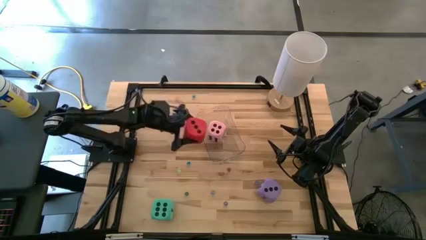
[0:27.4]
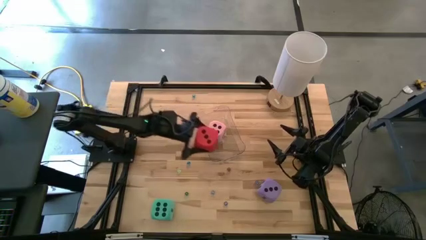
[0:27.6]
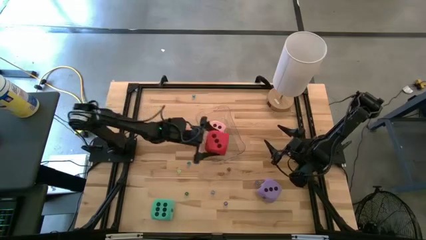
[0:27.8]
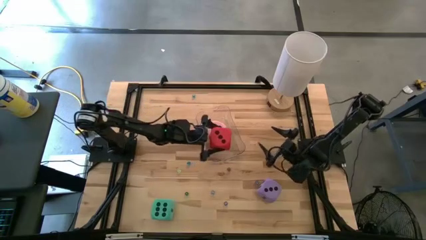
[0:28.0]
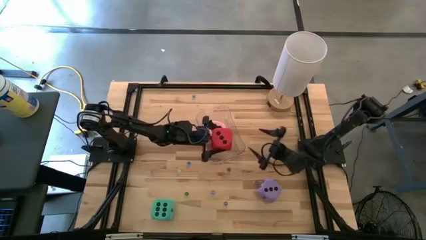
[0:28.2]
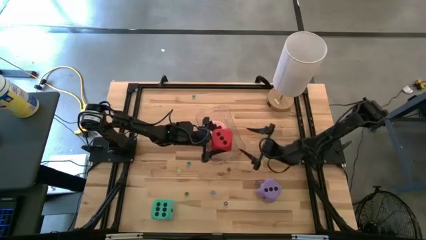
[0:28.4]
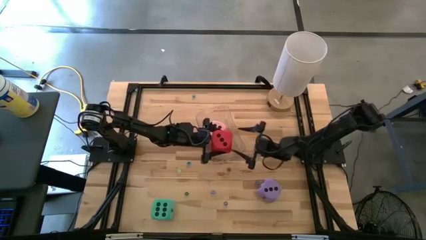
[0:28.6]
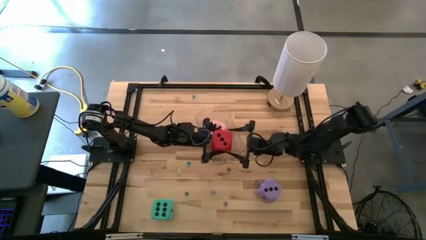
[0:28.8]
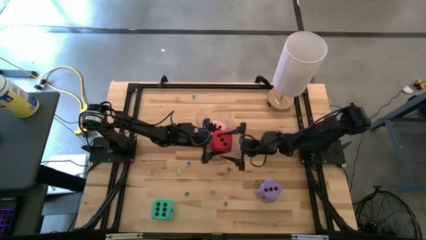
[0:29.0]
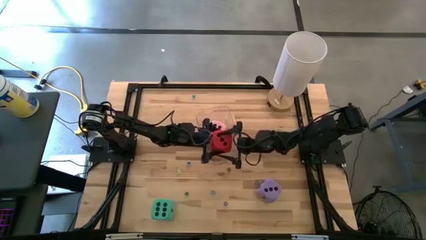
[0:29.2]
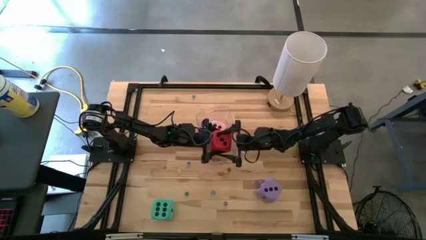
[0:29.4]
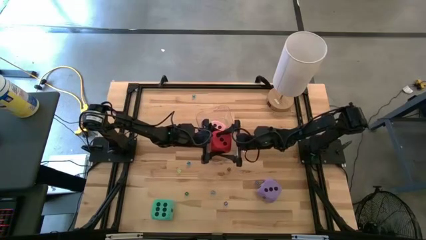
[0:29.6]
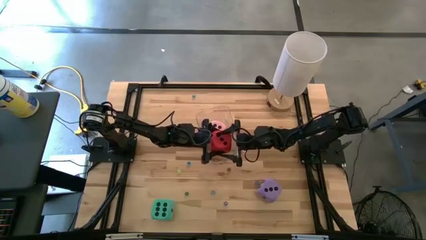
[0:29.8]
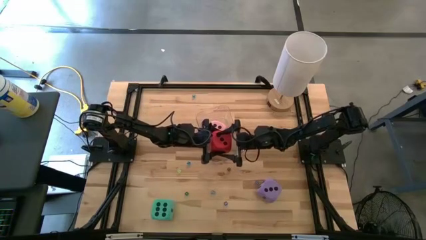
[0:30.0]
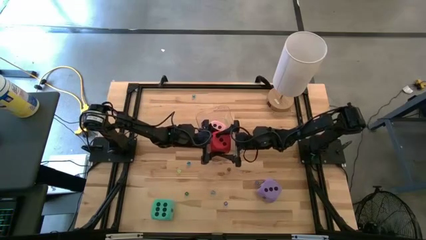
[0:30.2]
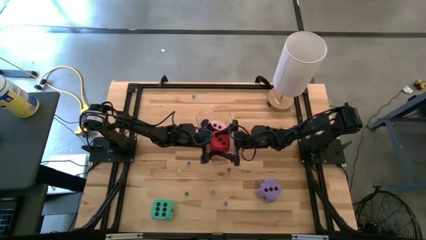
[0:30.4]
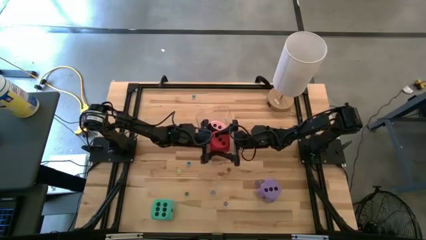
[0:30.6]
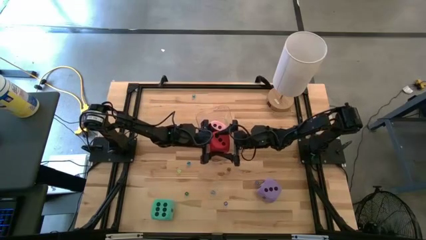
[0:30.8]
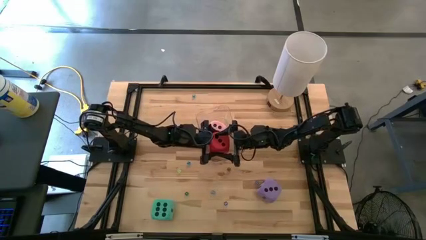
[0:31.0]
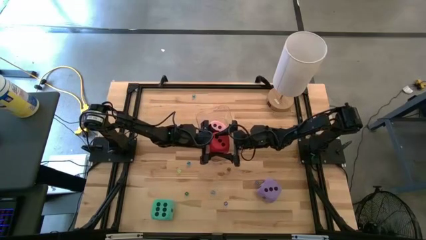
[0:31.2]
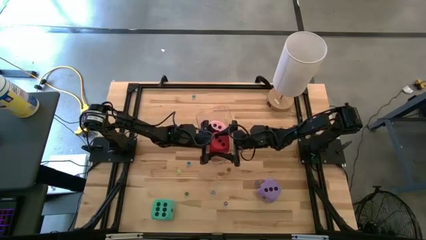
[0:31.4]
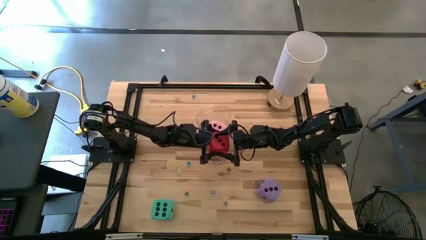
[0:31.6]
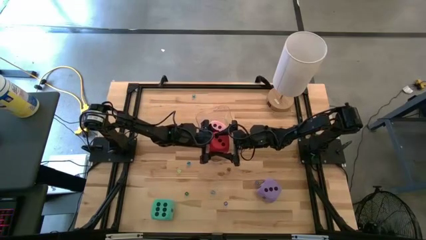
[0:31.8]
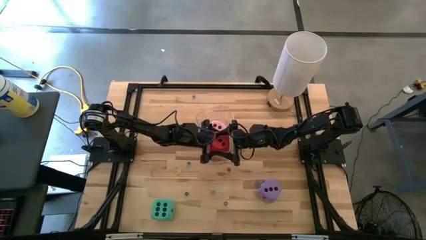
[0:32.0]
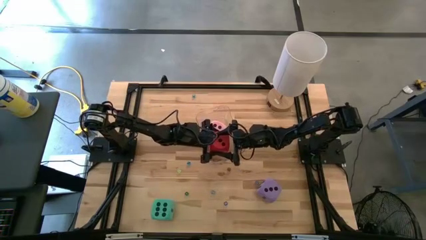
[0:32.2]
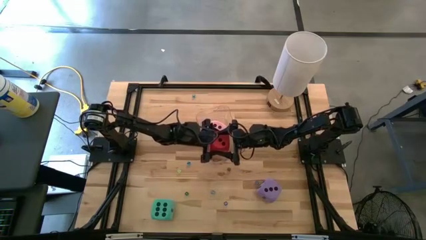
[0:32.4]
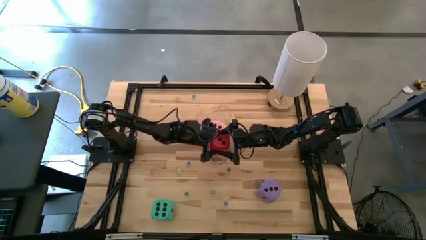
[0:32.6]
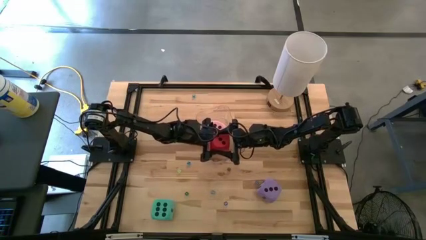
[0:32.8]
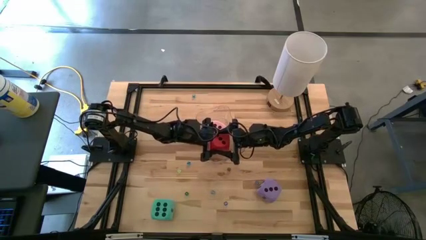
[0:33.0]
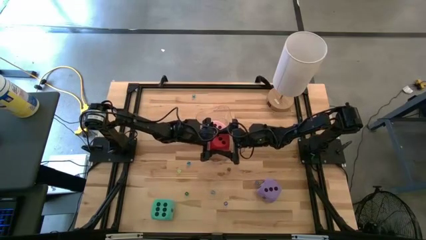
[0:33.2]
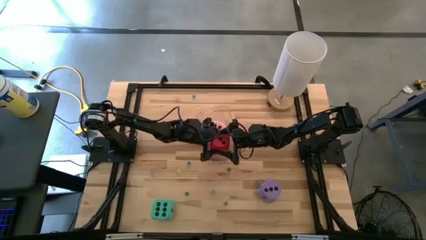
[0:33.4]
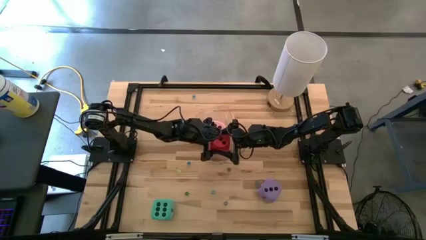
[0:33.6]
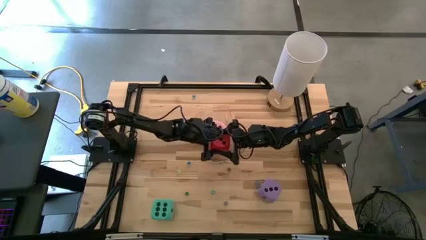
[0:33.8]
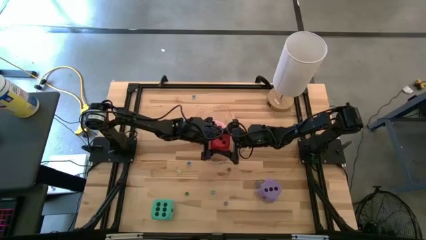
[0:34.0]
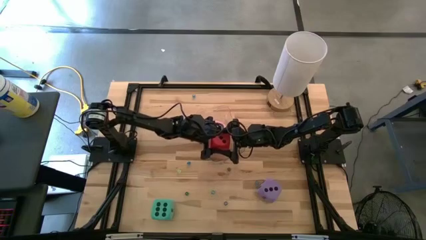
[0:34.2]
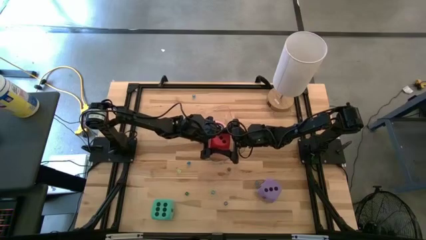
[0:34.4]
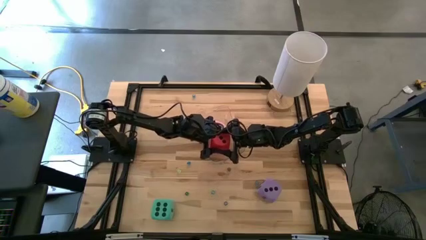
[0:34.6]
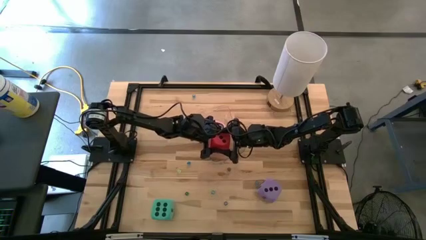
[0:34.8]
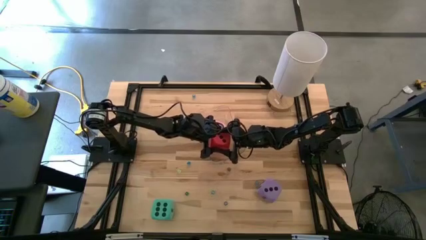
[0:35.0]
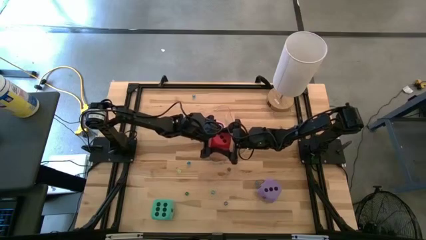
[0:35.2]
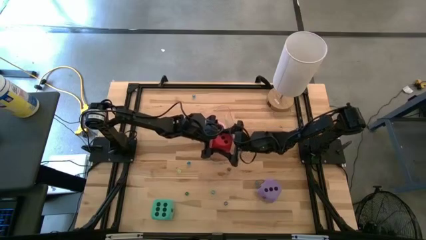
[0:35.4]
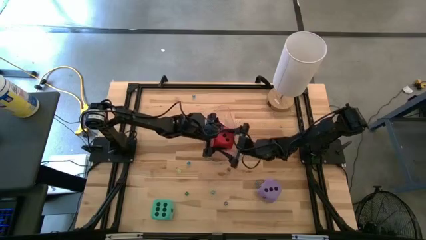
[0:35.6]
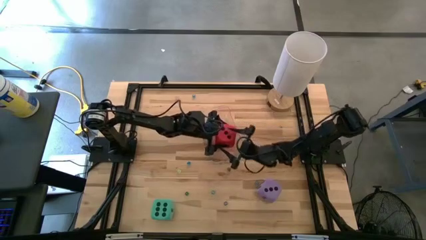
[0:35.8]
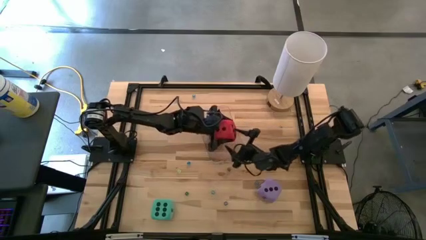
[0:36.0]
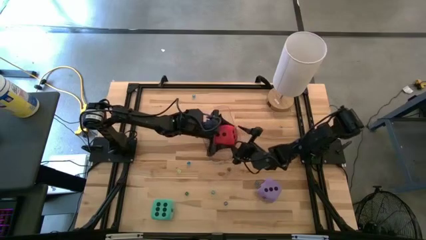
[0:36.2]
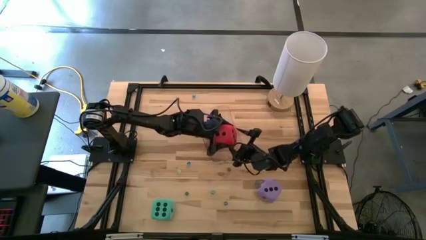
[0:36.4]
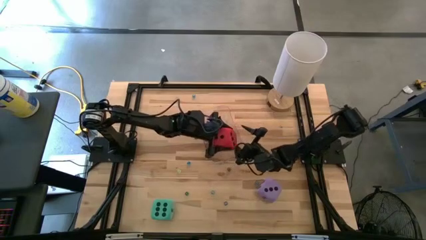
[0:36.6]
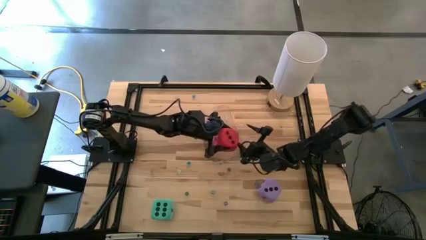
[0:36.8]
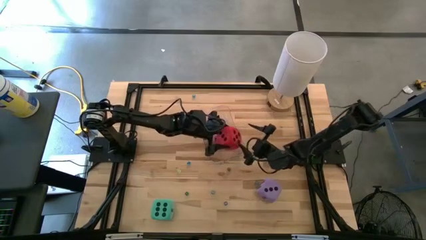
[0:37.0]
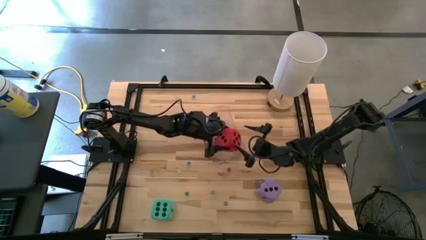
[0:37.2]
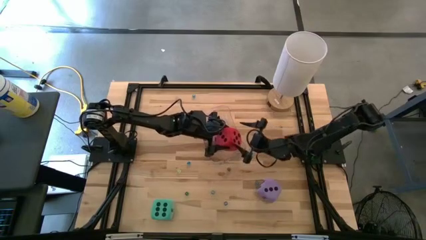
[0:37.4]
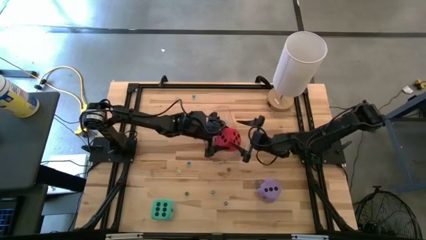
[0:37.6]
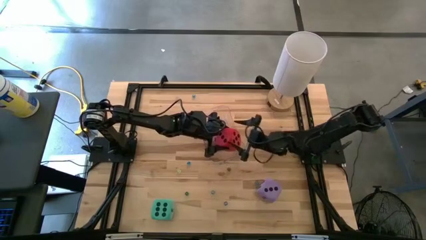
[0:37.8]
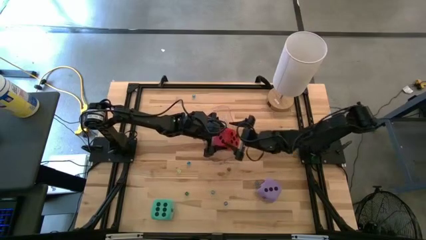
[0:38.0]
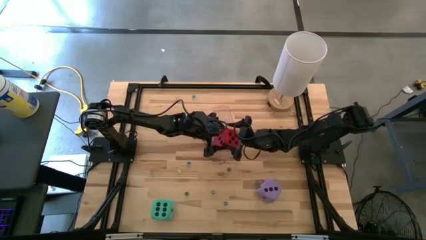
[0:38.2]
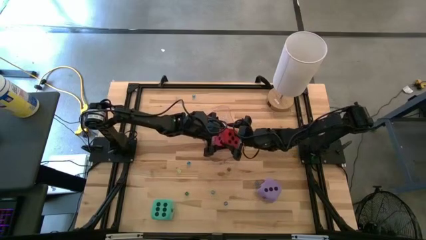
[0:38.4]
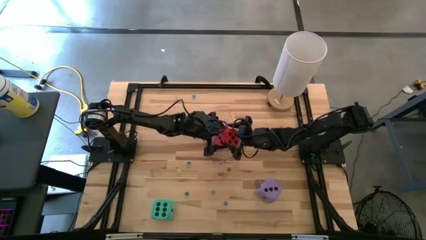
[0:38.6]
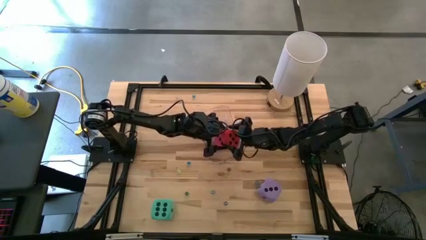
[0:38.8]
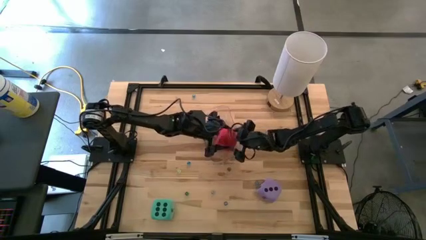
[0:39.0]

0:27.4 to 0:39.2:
Task: Pick & Place Dice
Put the large red dice into the transparent bin

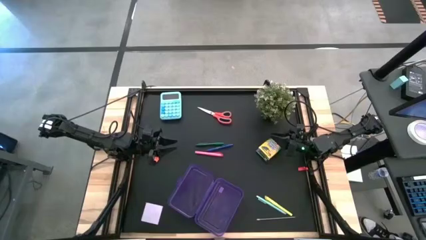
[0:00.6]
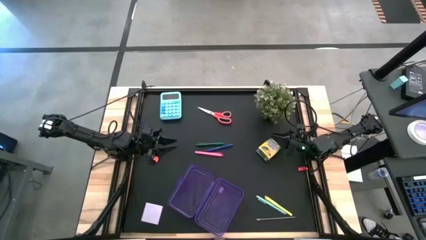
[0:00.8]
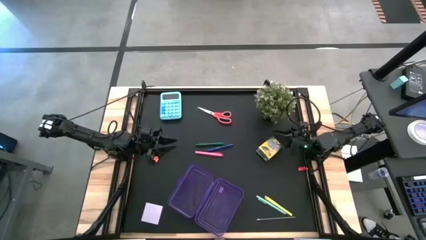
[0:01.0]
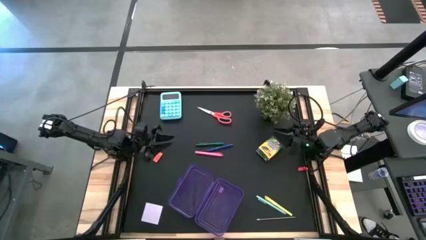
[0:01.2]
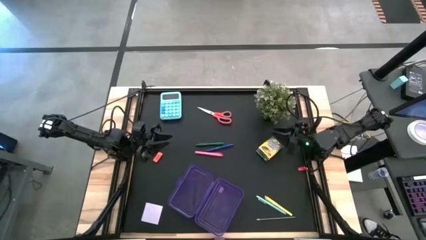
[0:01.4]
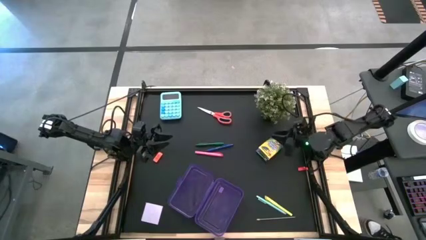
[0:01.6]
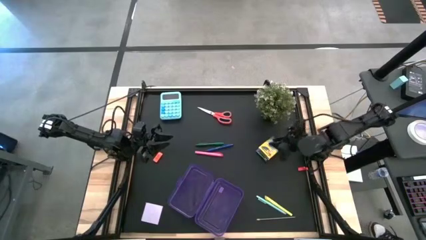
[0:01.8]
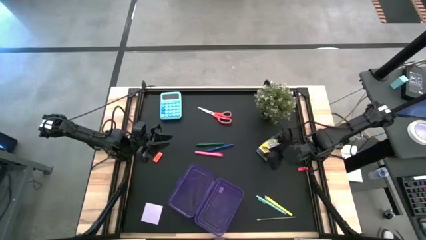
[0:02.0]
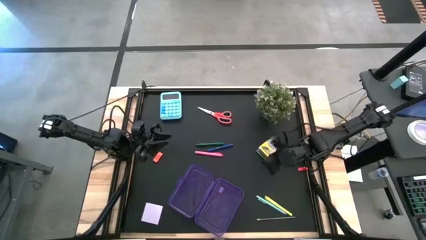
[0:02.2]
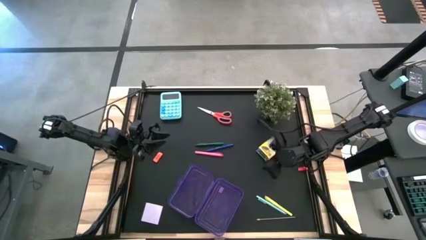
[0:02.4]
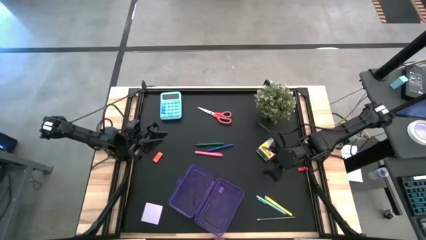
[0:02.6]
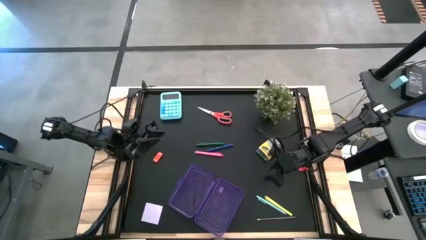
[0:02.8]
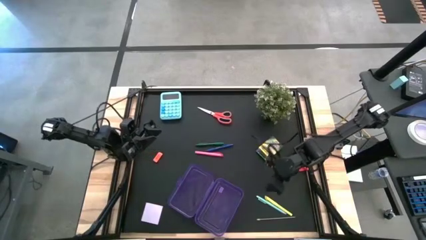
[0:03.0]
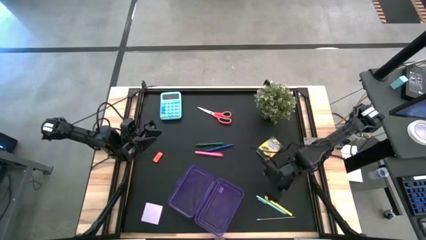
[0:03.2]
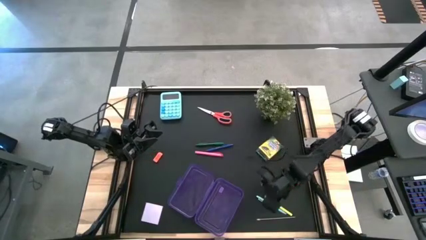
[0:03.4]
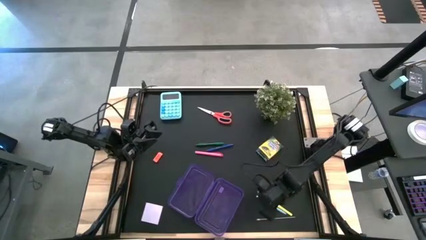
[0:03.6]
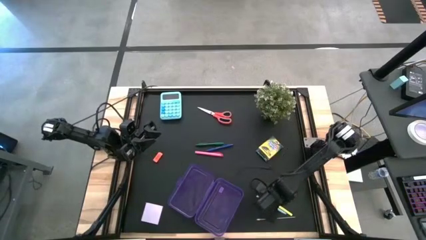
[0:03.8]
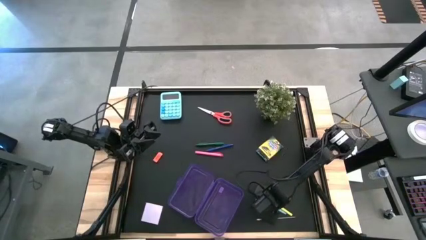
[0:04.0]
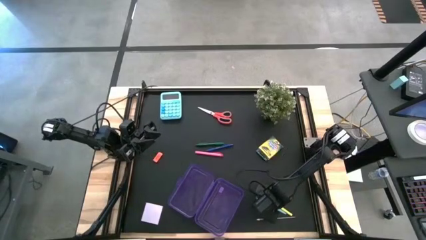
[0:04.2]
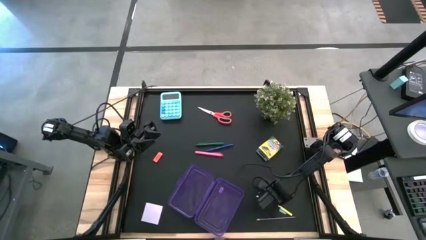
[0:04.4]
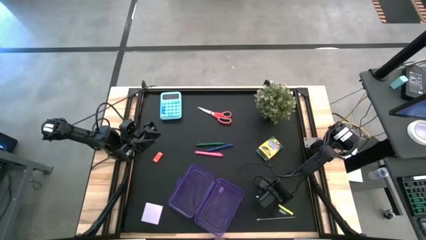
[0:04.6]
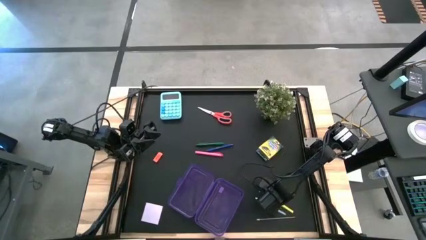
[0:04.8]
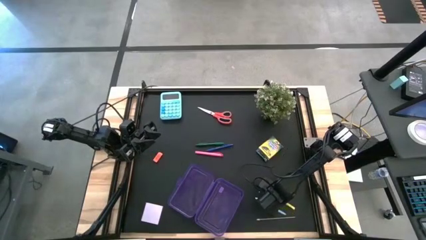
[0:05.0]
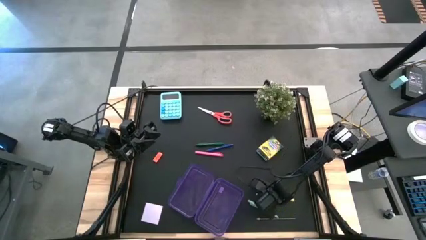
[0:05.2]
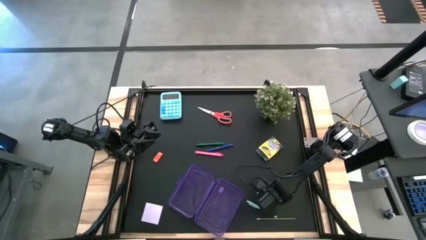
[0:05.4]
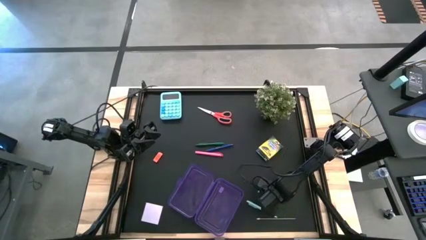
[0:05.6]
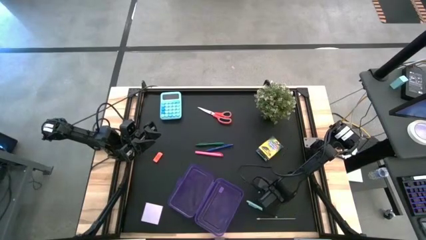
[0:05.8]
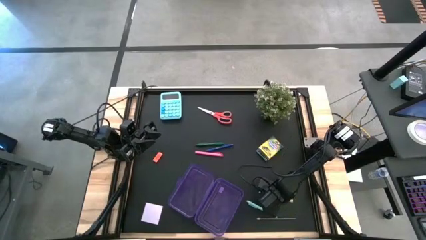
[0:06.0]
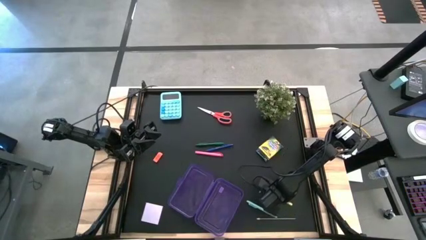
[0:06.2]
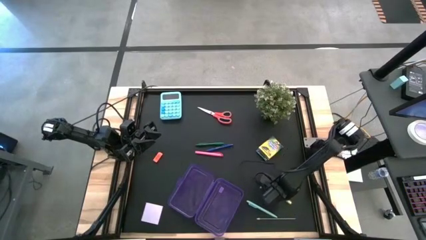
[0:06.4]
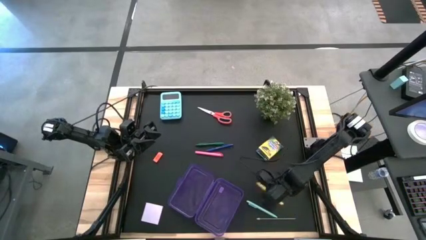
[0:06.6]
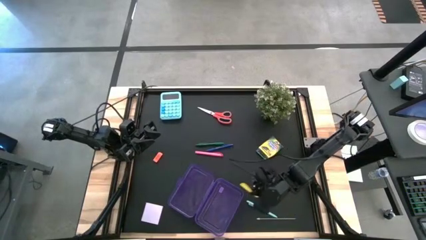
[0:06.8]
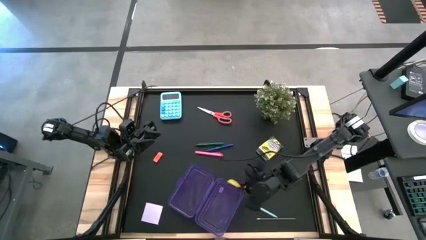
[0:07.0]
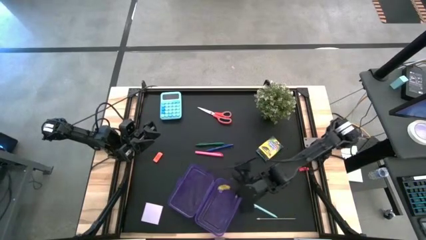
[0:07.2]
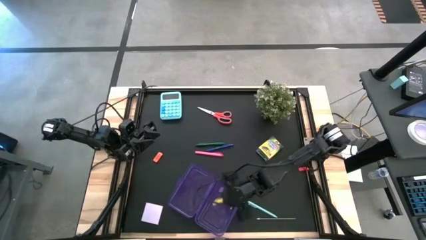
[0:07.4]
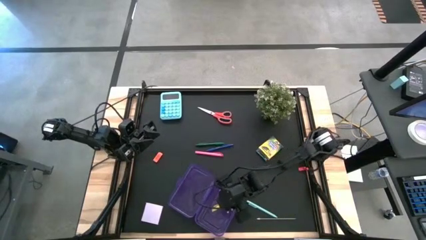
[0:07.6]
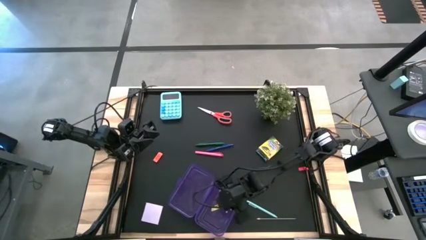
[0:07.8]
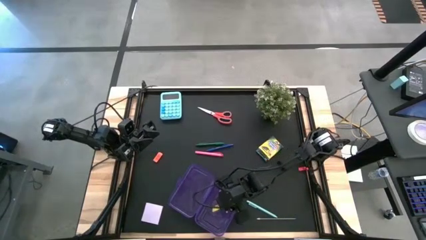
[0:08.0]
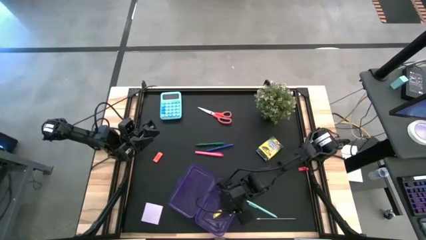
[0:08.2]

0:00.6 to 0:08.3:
Task: Pack school essentials
Put the yellow pen into the purple supply box
